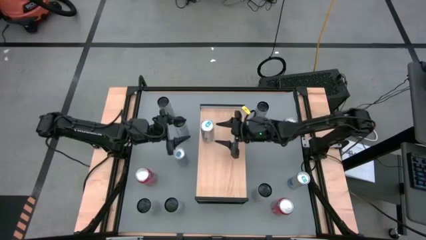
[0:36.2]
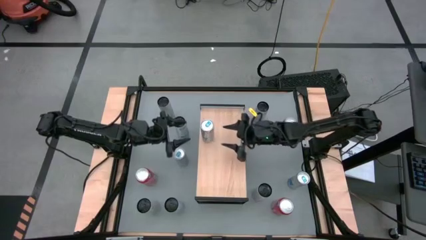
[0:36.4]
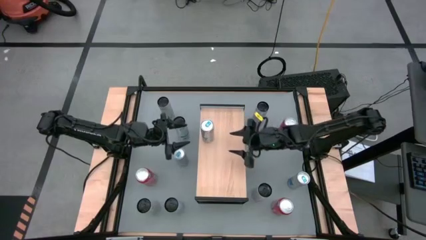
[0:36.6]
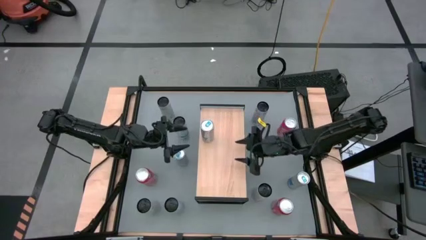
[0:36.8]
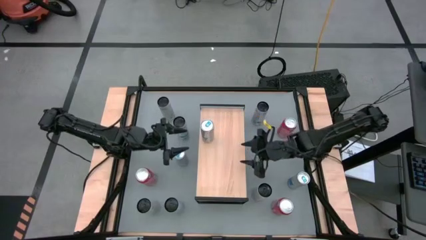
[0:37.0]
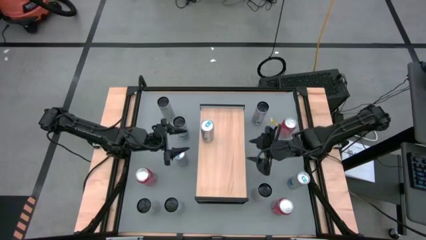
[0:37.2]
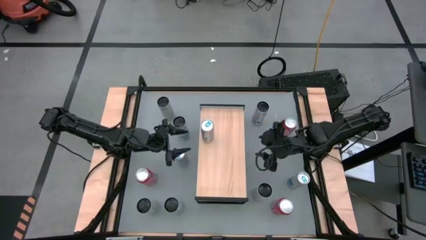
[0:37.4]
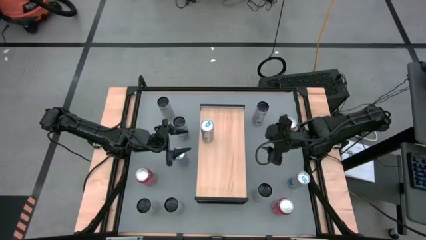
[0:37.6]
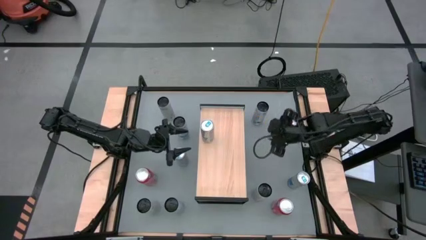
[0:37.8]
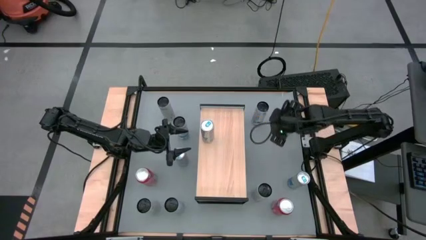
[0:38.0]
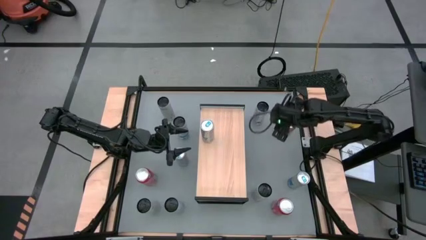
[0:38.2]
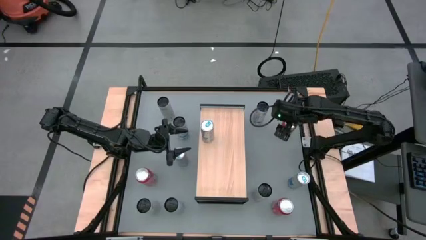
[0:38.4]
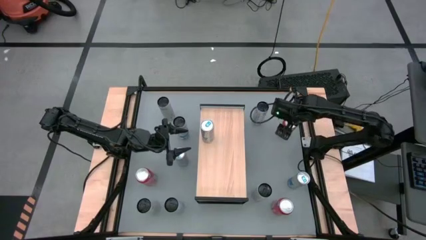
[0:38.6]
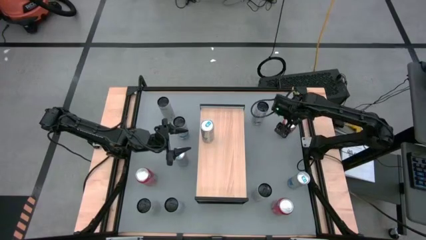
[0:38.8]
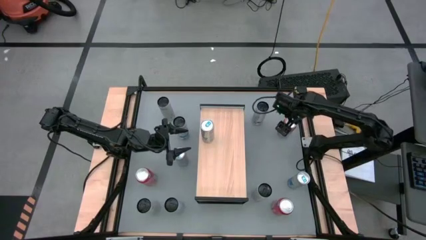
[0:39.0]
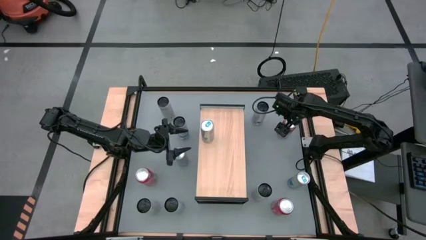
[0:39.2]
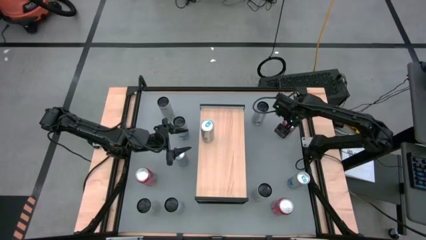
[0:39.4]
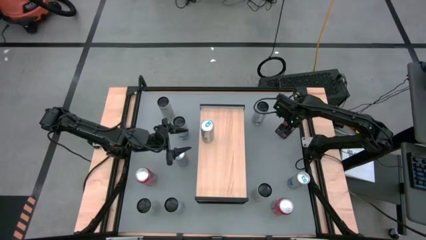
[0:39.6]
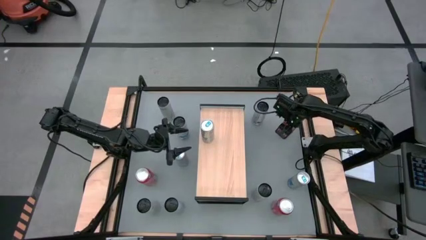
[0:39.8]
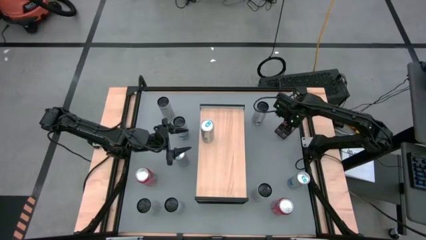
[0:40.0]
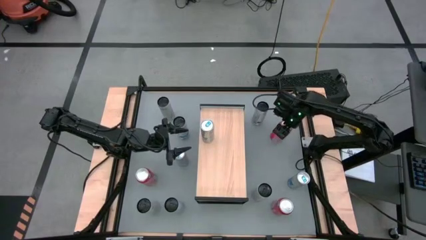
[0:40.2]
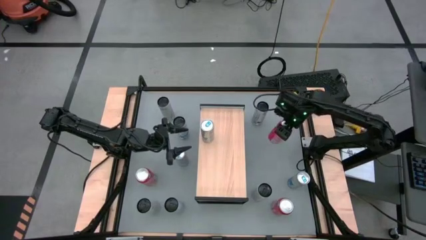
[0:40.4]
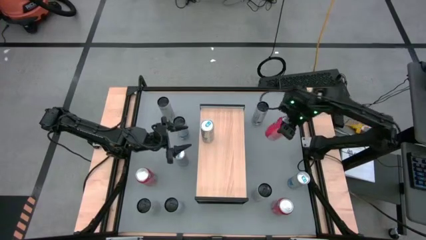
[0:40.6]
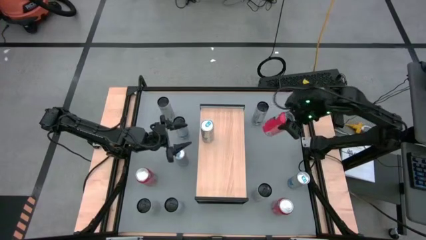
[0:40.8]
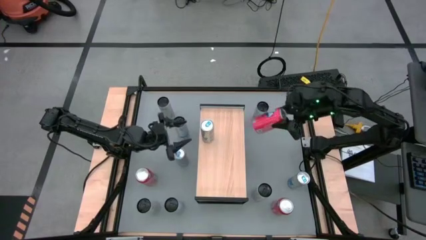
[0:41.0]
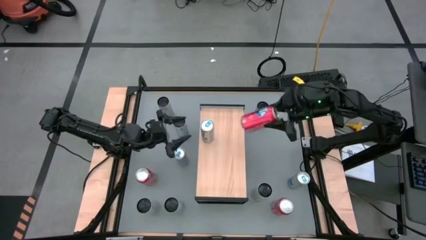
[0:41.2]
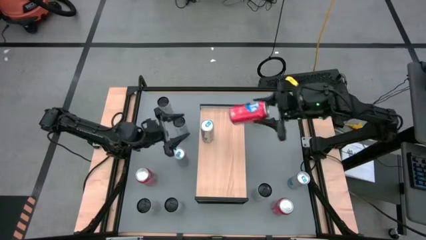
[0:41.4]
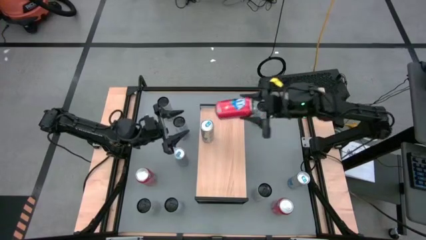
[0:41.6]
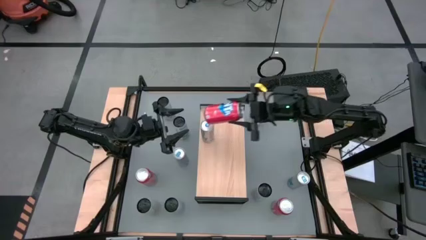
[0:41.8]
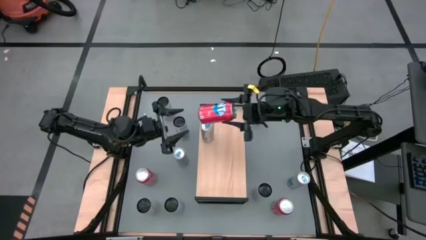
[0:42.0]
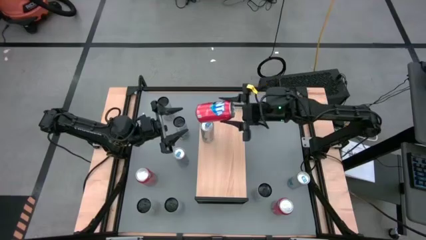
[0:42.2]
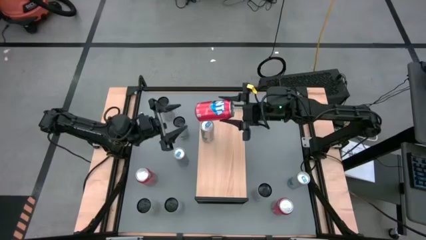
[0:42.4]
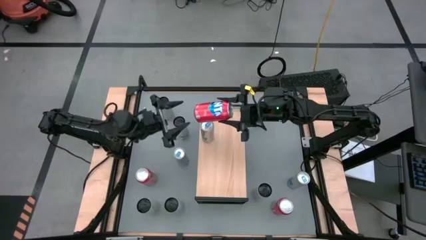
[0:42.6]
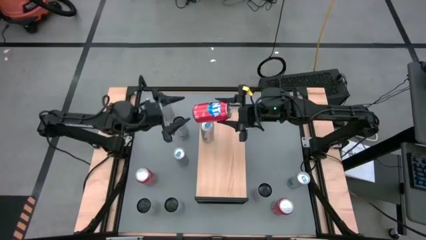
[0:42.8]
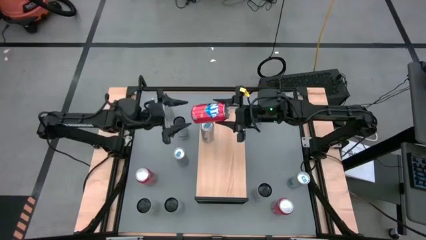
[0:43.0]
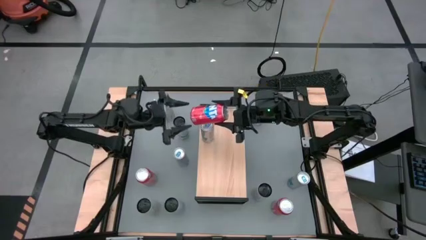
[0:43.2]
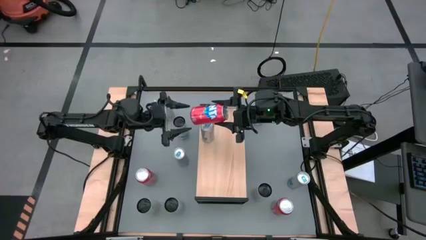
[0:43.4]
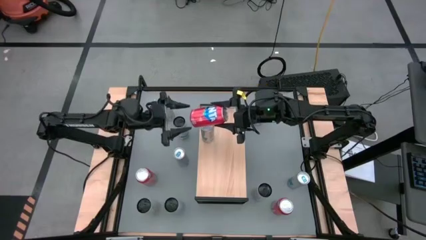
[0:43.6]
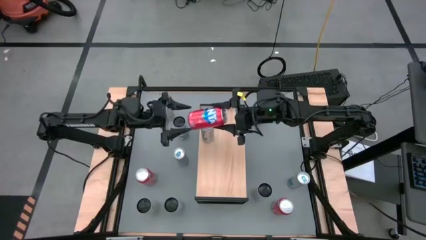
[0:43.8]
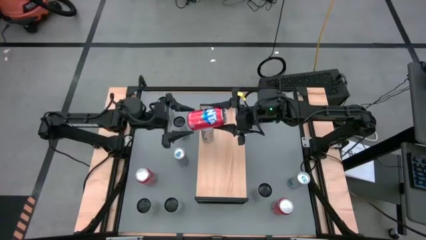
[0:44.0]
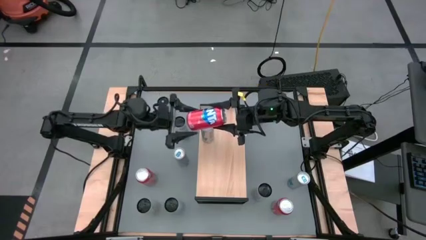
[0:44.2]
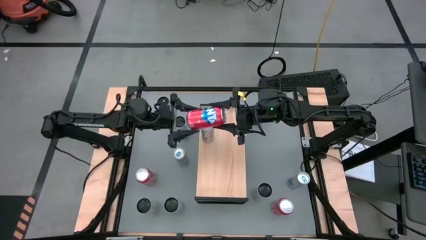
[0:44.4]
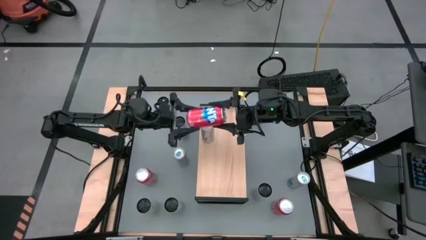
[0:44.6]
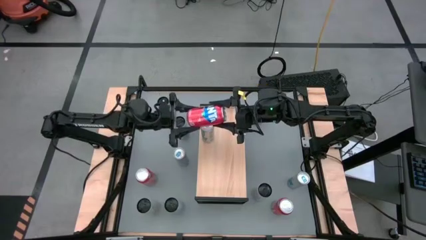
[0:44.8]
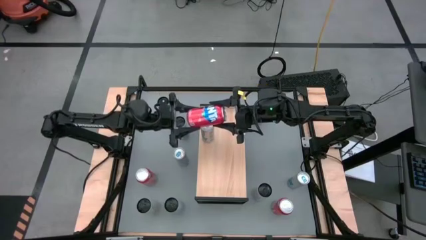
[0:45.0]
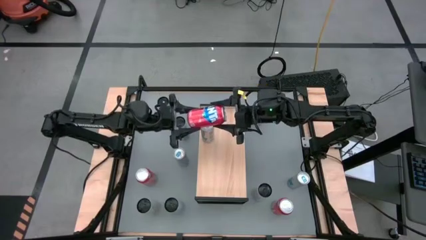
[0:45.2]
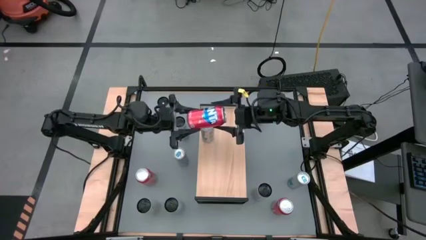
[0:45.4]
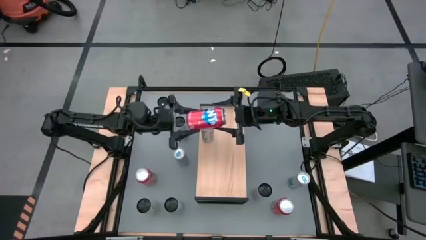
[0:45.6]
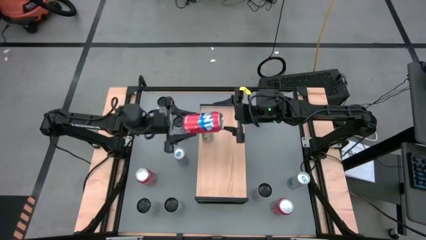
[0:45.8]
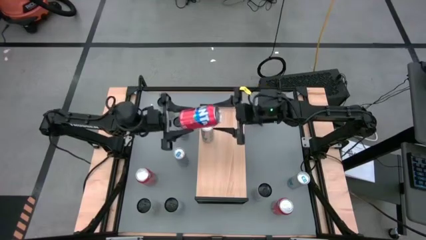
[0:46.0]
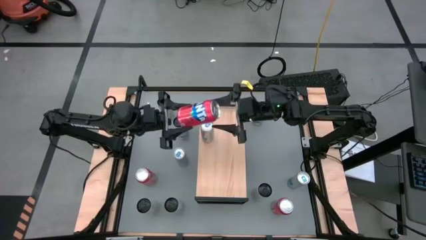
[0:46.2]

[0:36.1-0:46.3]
Task: Place canned beverage on shelf
Put the top right orange soda can on the shelf aligned with the other blue soda can

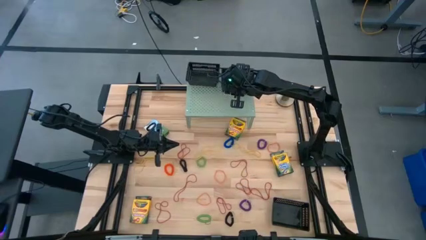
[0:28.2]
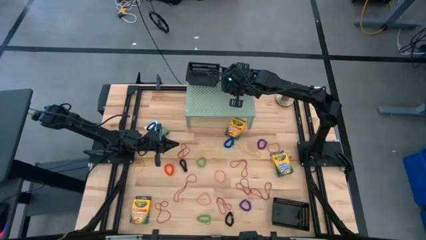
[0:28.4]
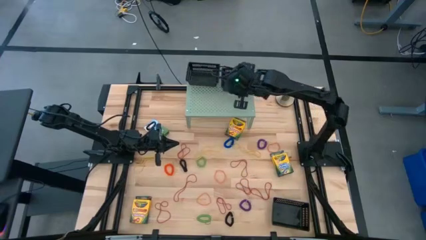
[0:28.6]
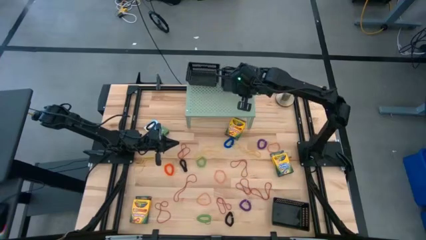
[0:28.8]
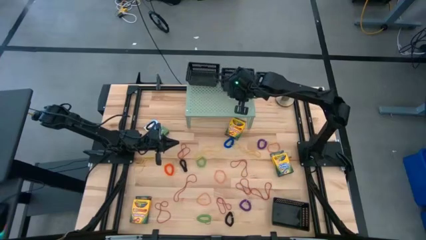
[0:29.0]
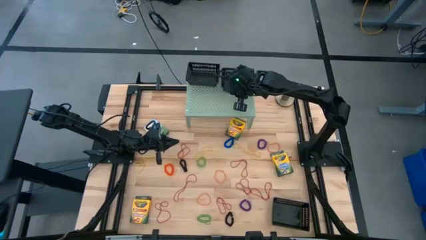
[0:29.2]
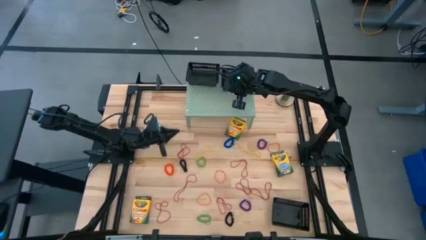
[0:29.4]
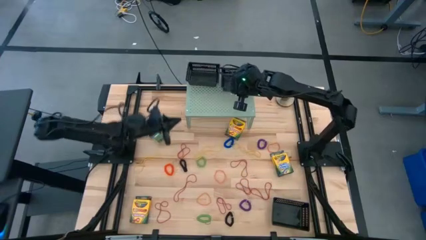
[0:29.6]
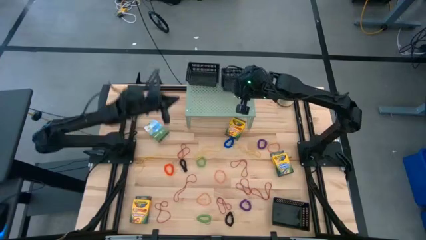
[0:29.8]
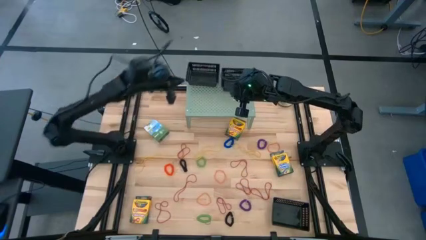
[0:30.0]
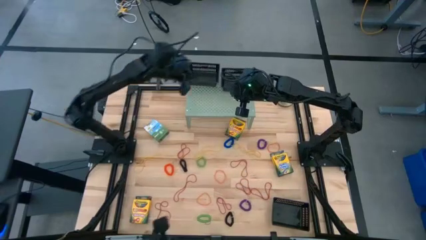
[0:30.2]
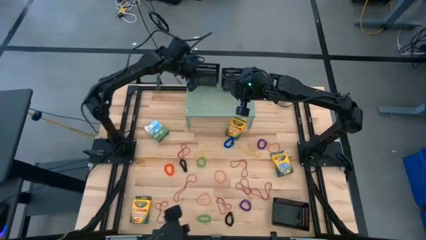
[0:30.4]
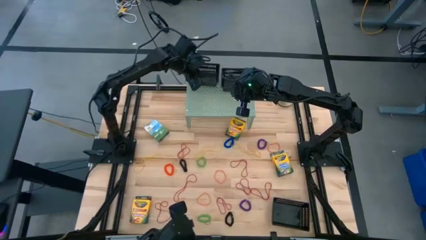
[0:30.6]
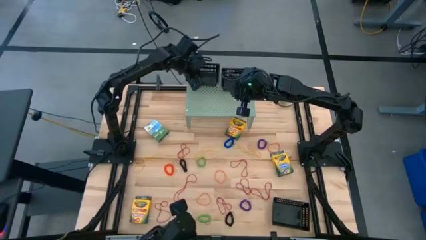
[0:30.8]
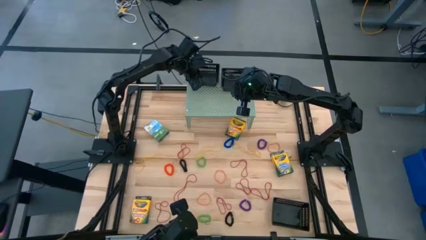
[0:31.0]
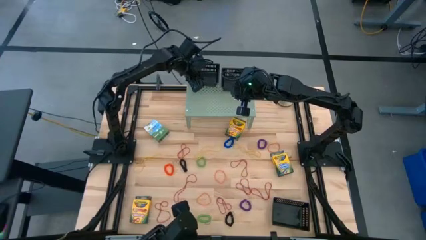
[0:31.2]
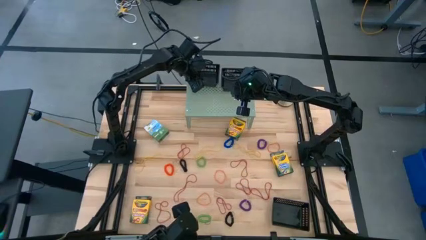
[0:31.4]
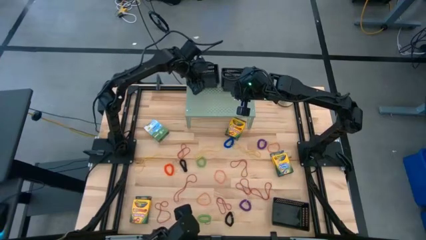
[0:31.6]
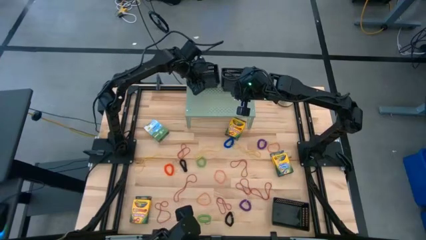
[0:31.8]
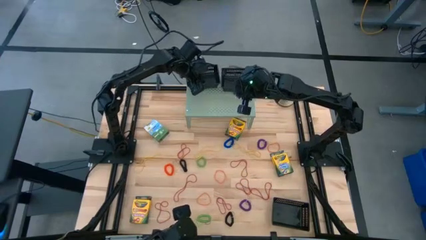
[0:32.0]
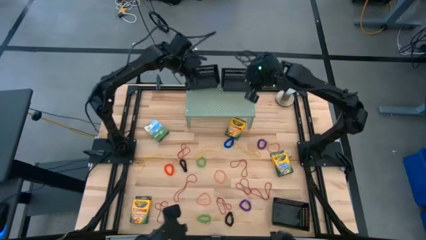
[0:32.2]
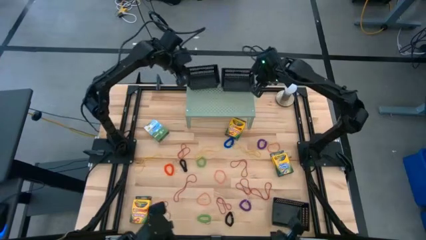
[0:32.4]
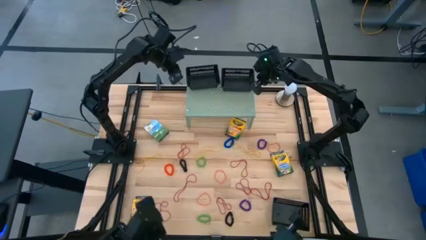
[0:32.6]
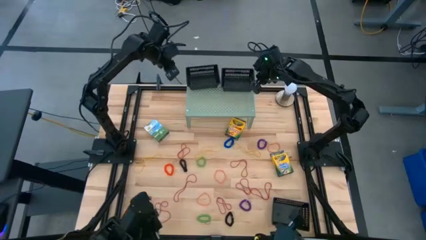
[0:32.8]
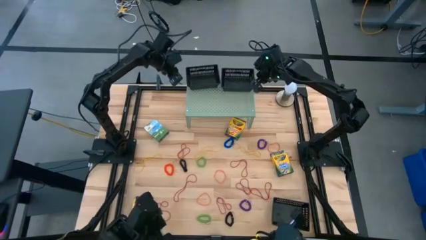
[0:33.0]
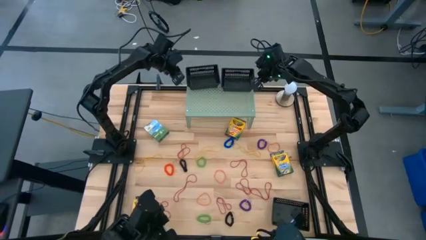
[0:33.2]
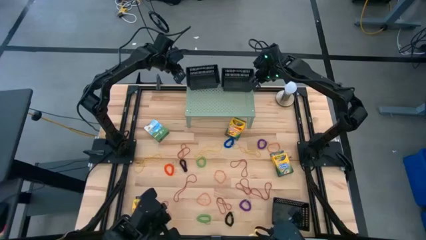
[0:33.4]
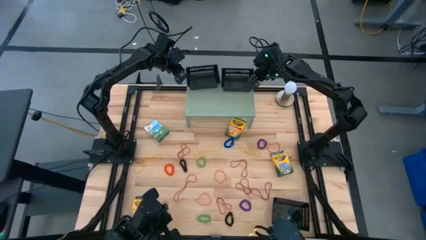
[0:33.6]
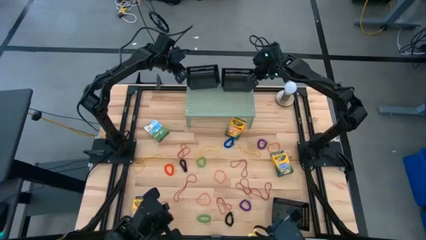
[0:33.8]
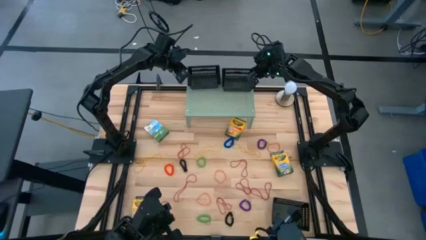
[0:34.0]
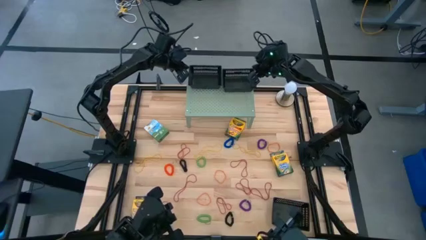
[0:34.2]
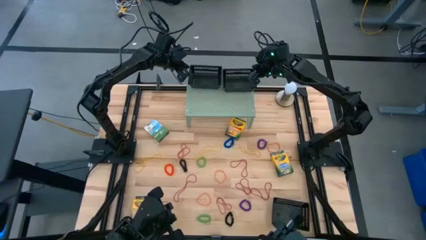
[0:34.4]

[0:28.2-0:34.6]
Task: Pick & Place Office Desk Supplies
Adjust the left black bin on the shelf
